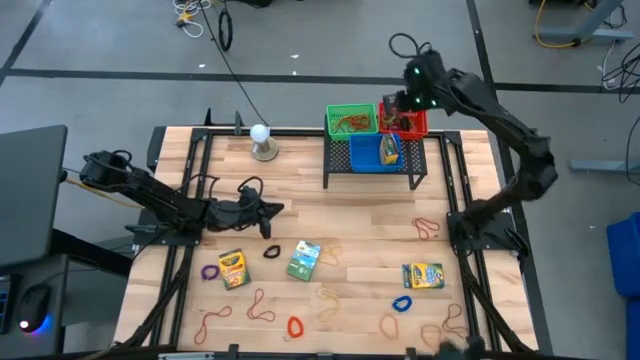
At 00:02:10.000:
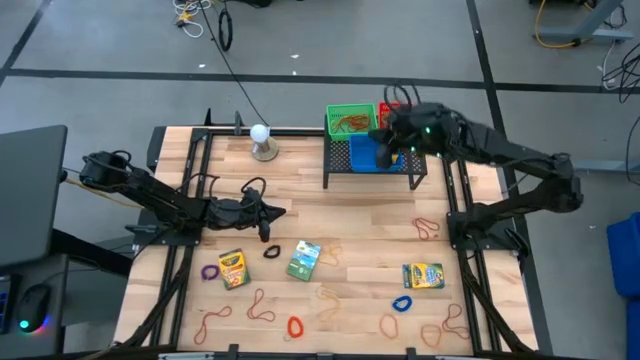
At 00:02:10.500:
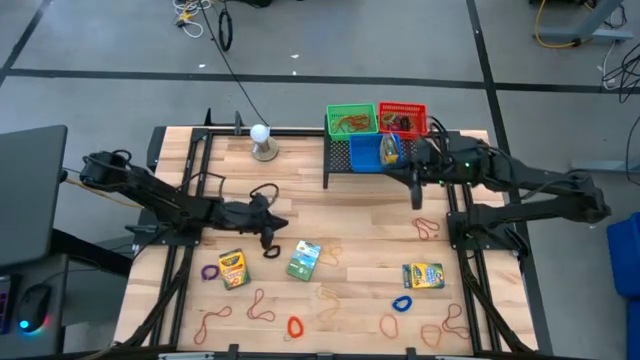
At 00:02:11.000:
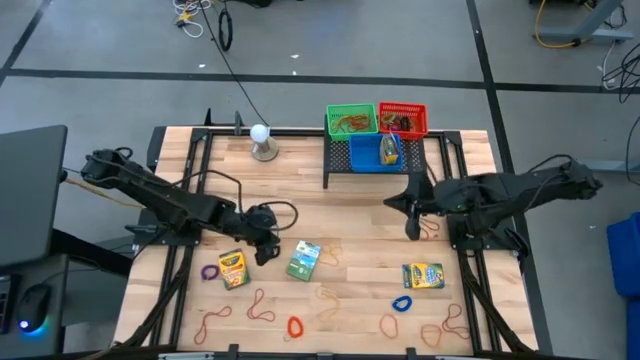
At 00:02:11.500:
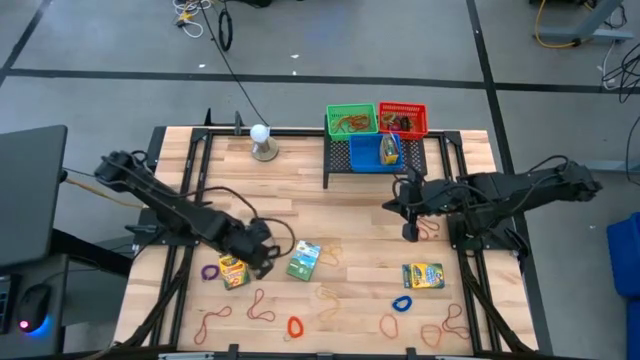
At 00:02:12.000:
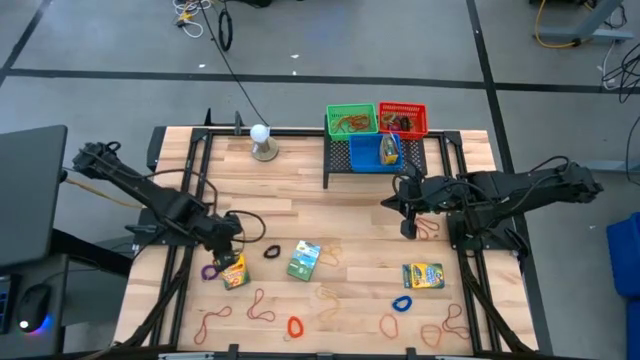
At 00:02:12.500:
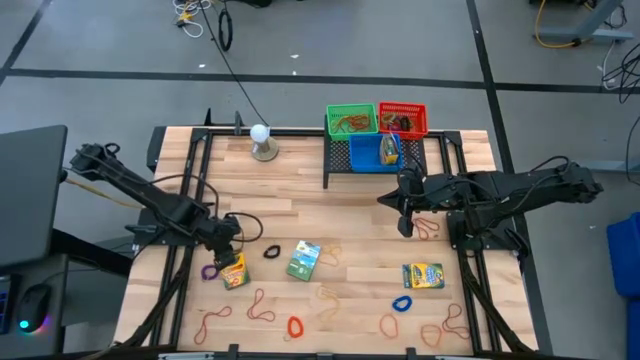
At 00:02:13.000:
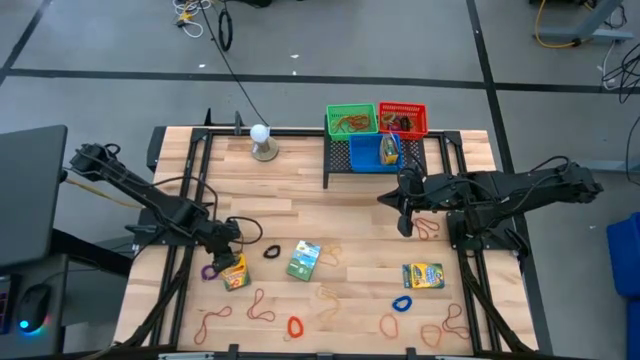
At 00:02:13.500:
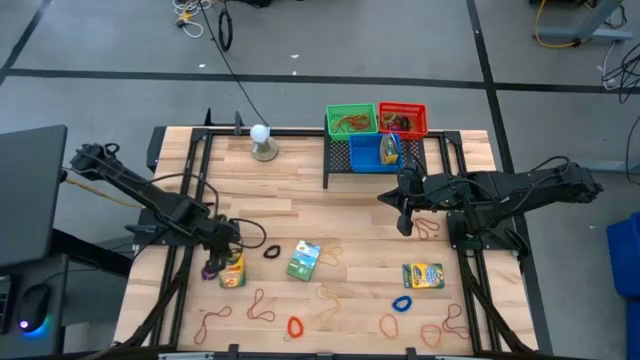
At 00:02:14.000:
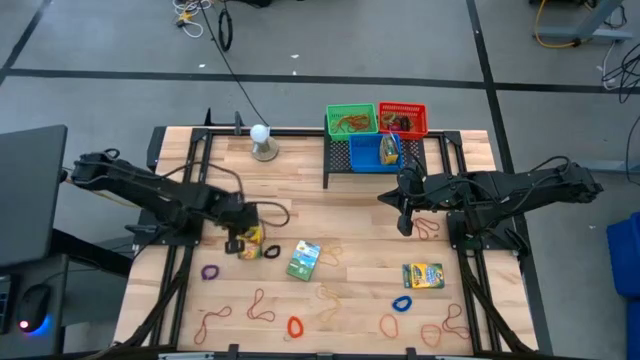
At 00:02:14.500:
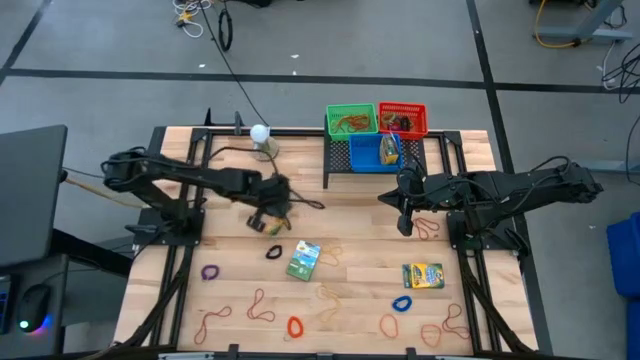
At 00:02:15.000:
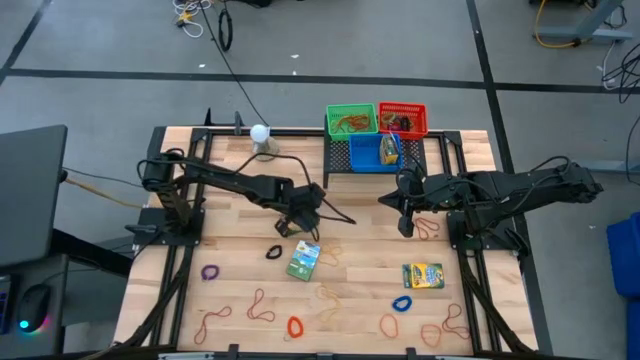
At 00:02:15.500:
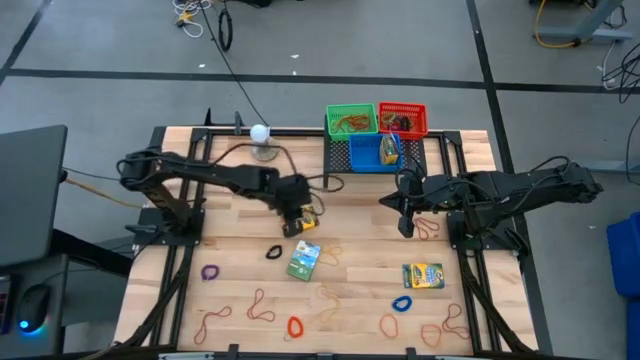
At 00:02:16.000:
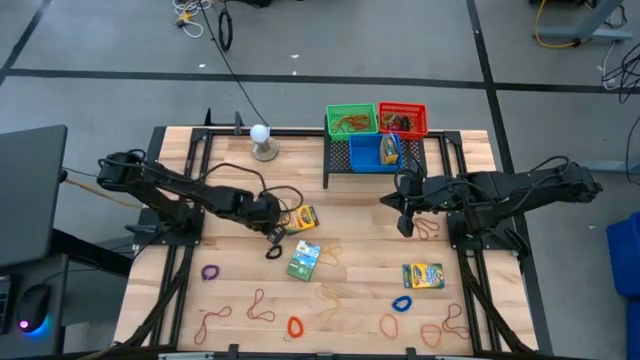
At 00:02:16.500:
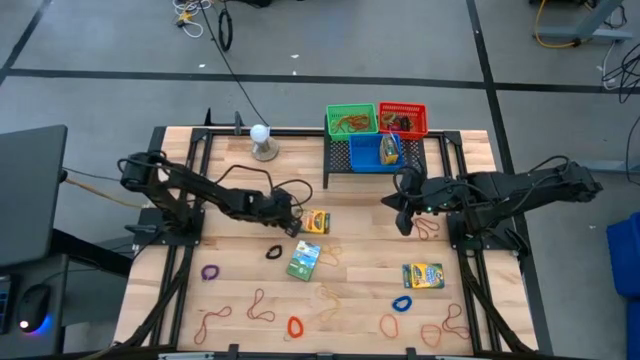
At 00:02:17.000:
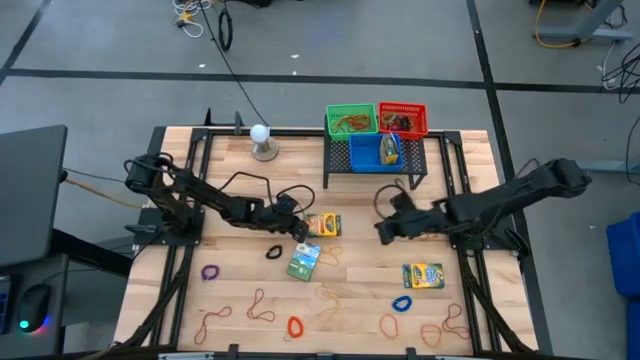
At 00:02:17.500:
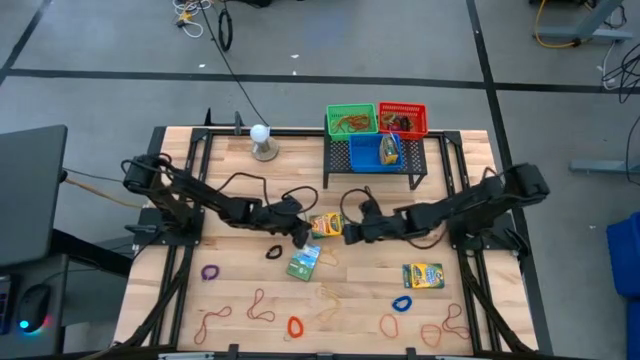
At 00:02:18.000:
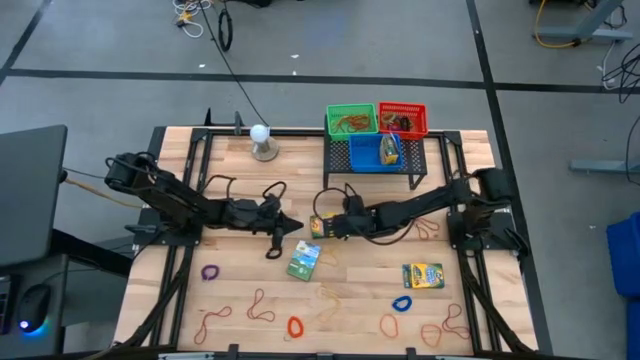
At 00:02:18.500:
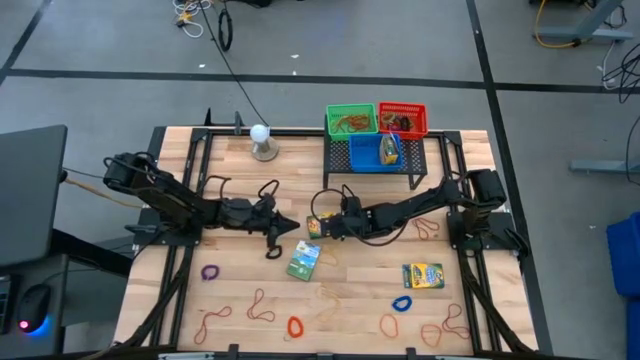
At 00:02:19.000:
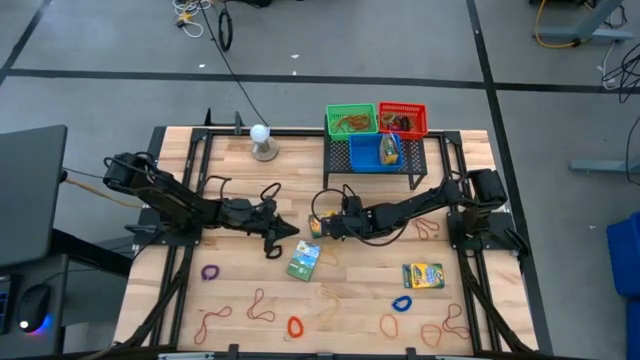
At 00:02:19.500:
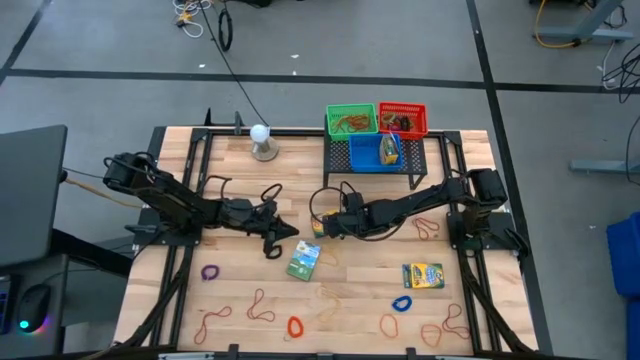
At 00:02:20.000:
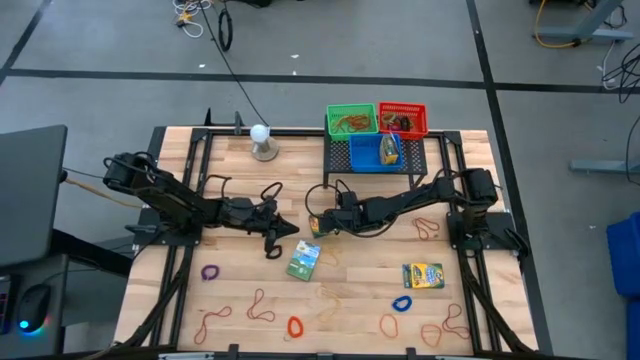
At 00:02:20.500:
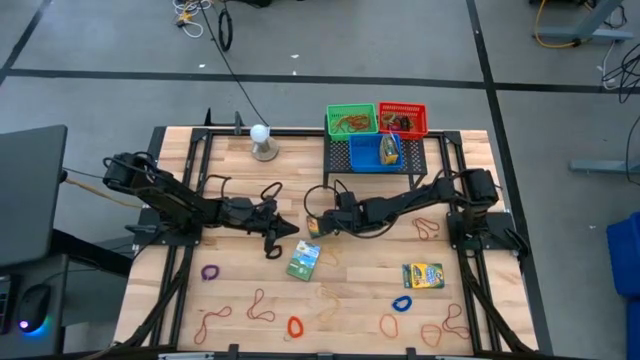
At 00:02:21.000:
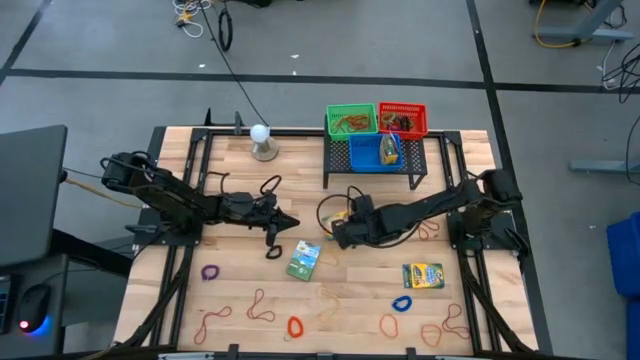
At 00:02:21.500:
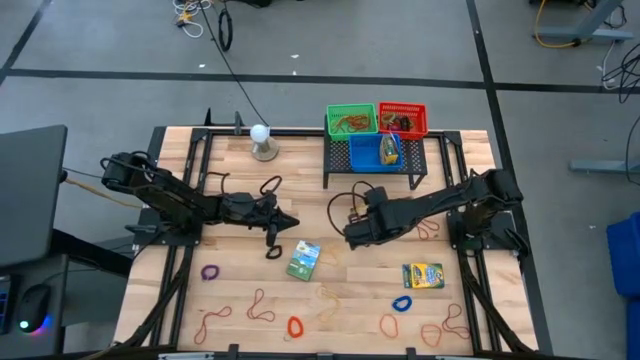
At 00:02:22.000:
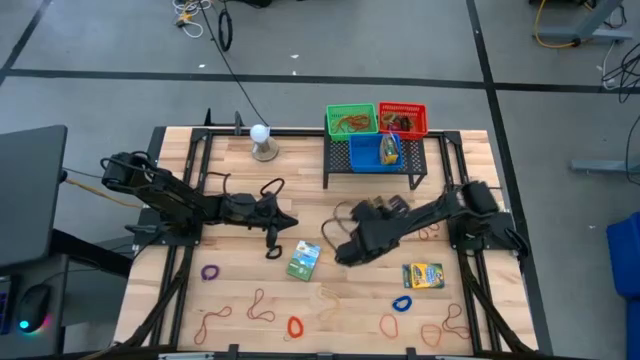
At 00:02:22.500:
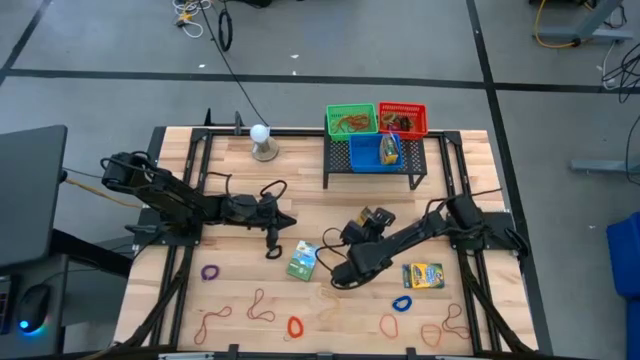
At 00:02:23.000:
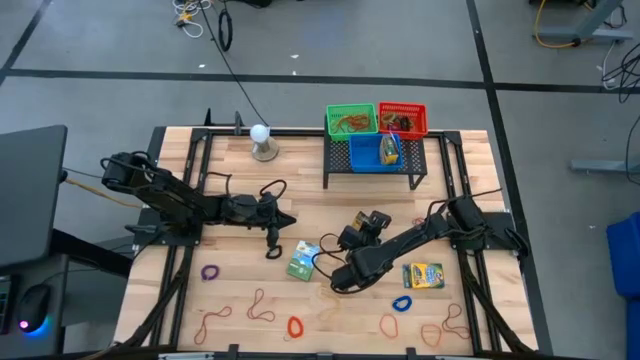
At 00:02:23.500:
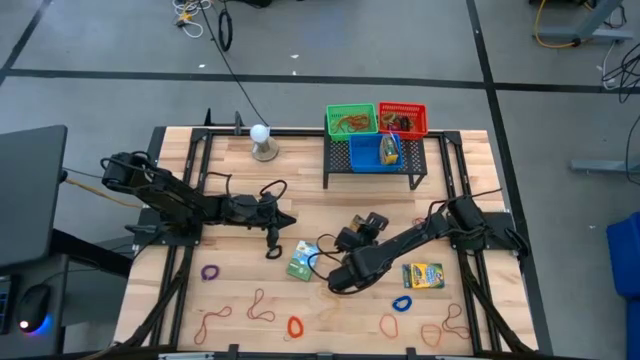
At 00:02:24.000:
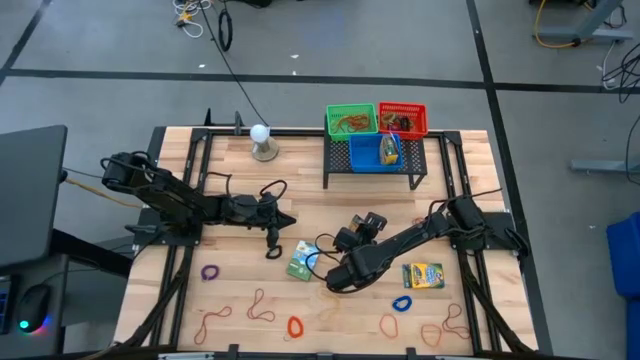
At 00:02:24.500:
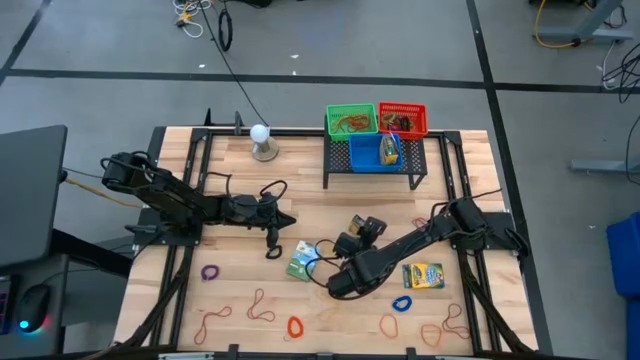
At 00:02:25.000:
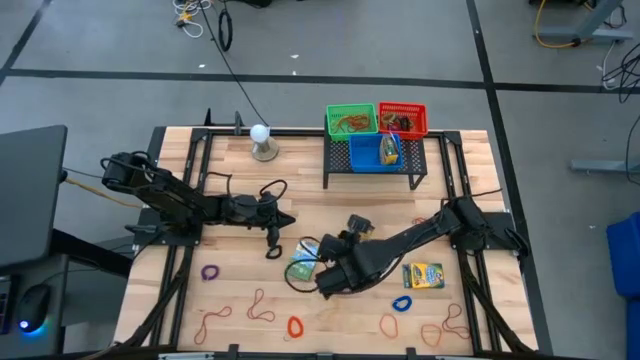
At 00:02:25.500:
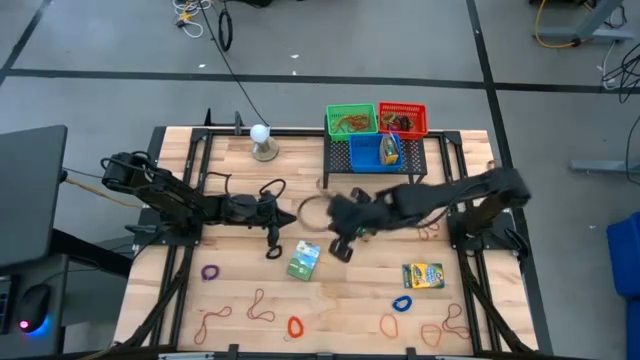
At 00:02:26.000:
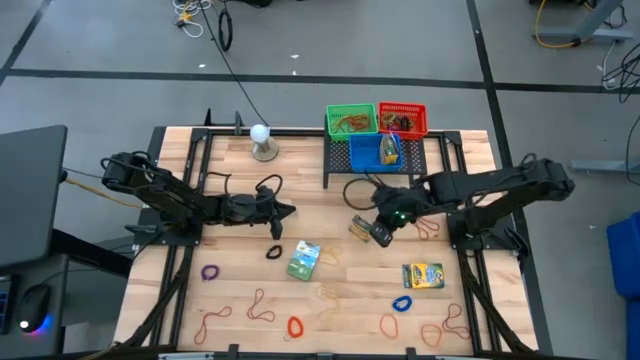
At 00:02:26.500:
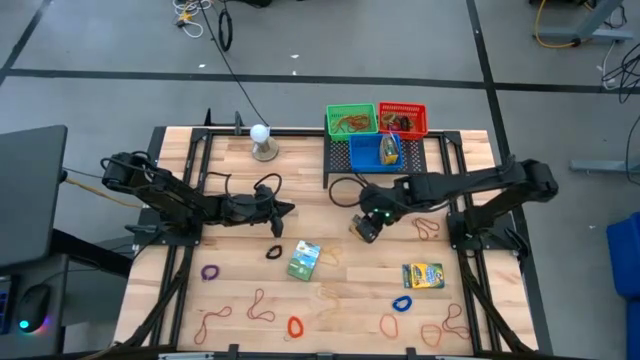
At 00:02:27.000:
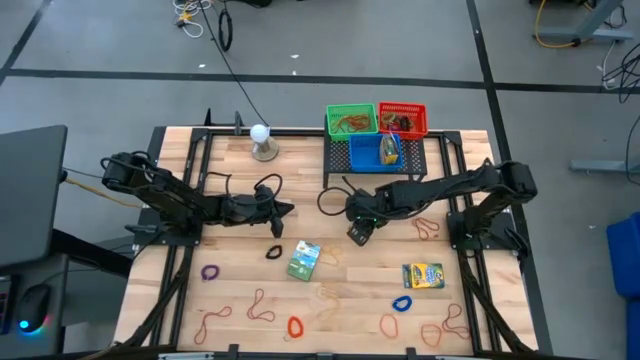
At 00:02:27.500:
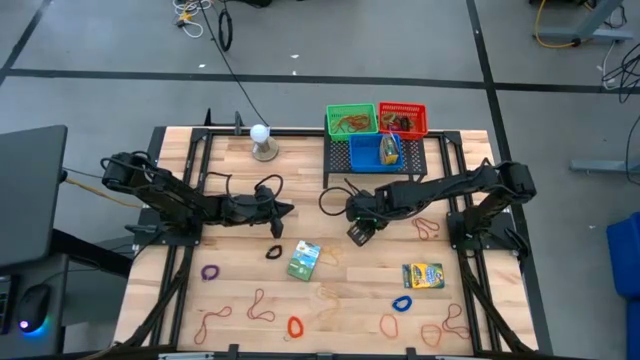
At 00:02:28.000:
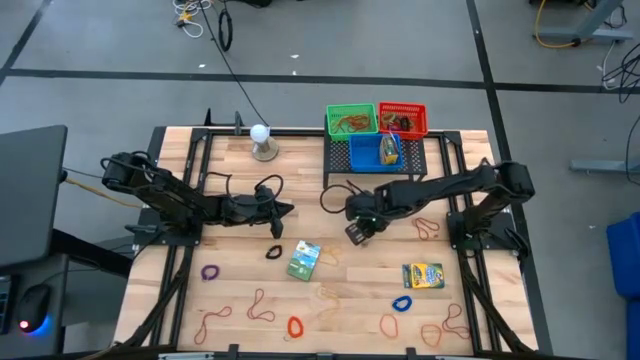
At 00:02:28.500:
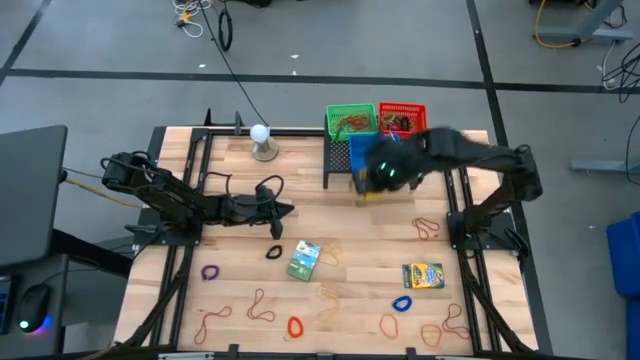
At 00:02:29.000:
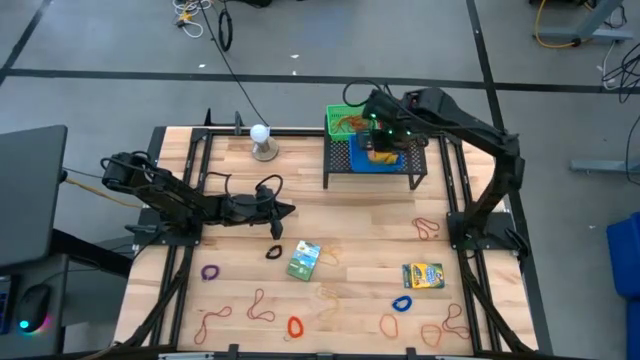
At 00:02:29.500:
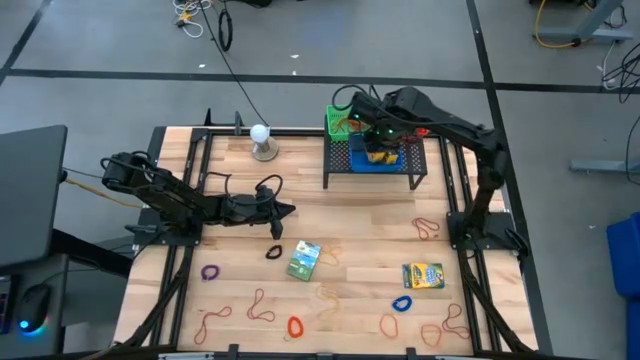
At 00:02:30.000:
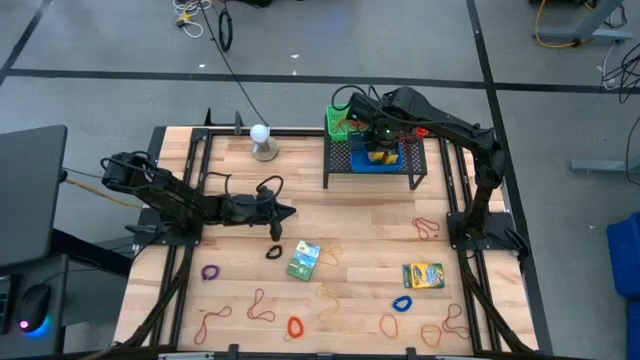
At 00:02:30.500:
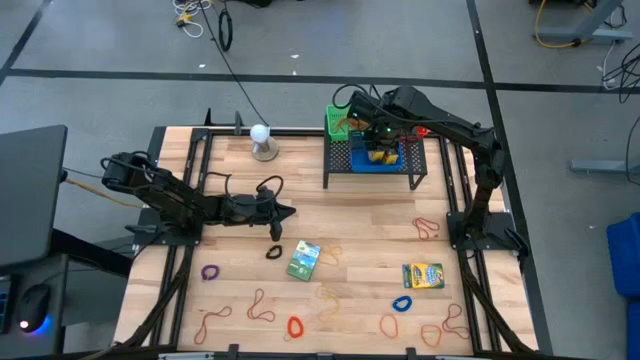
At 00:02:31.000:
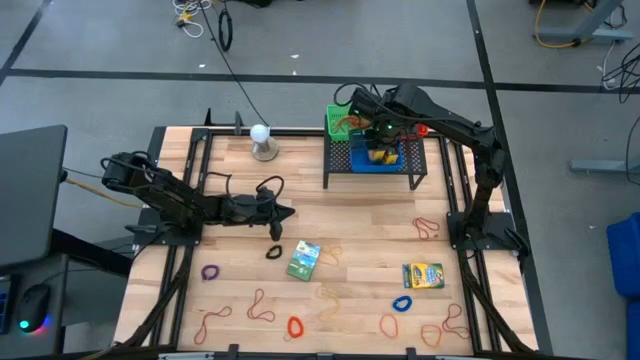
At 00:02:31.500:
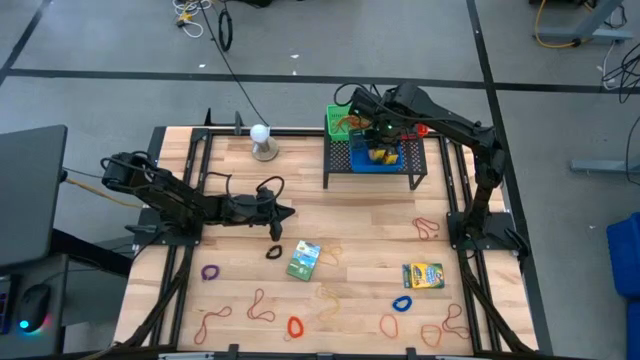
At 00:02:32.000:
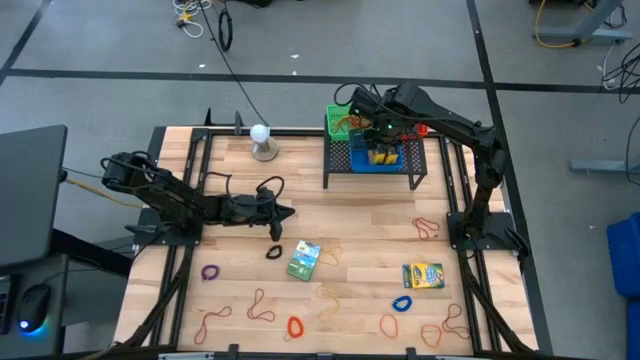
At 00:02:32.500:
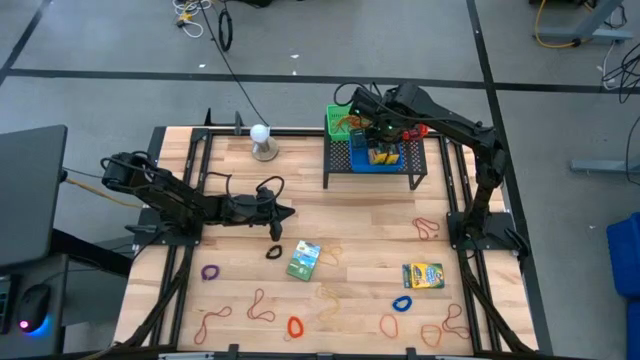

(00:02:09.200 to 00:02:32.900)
Task: Pick & Place Office Desk Supplies
Put the yellow crayon box into the blue bin
